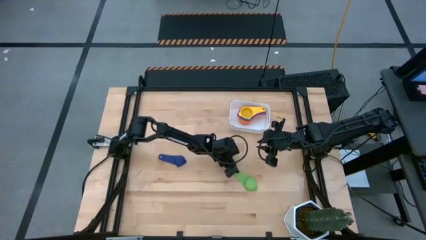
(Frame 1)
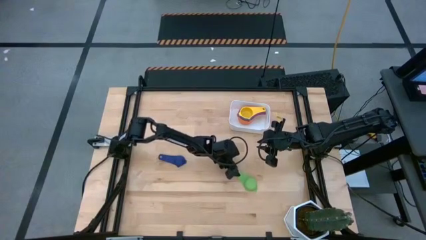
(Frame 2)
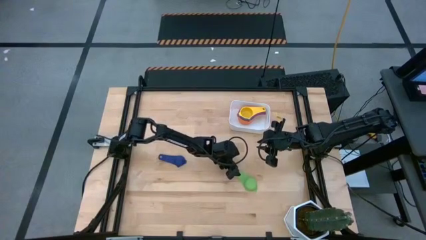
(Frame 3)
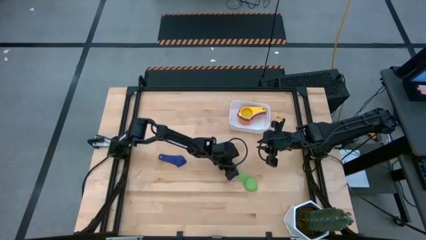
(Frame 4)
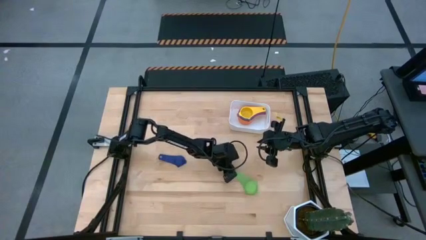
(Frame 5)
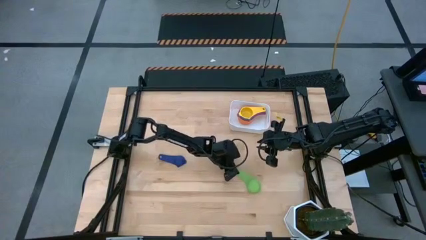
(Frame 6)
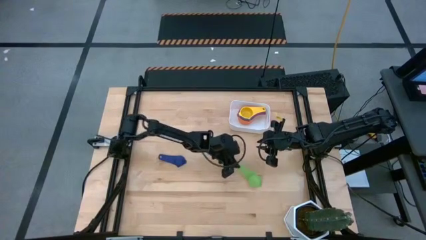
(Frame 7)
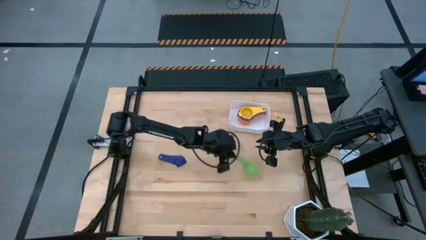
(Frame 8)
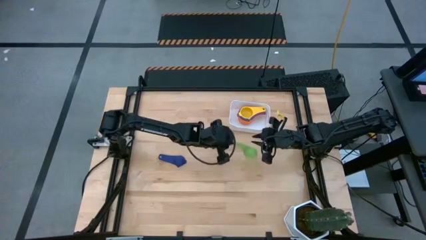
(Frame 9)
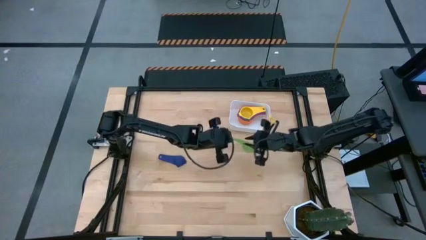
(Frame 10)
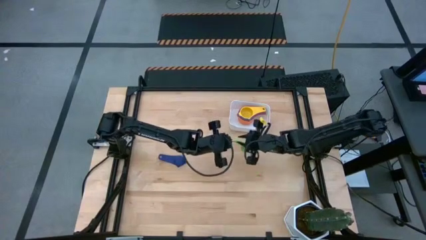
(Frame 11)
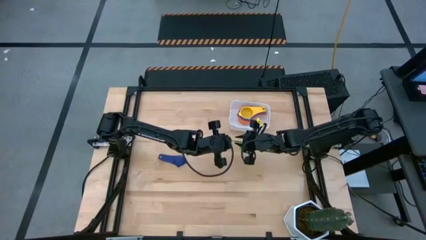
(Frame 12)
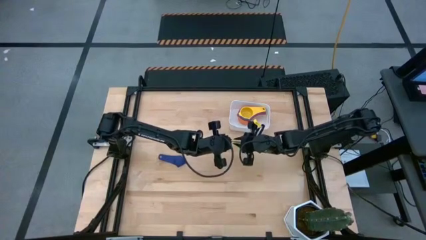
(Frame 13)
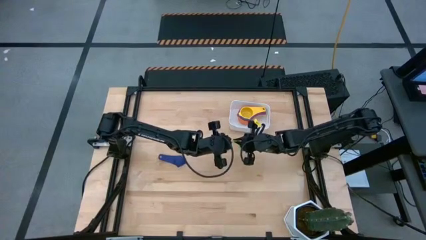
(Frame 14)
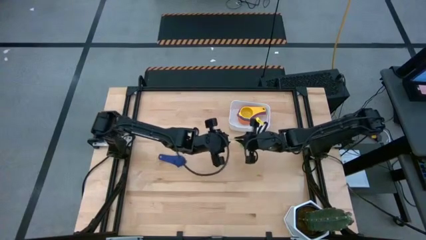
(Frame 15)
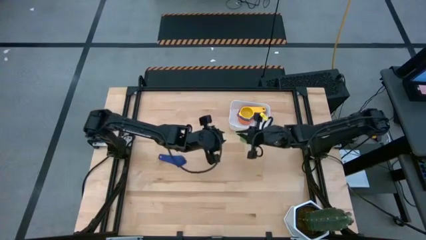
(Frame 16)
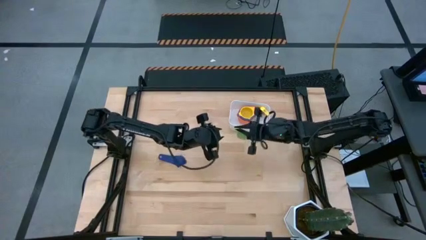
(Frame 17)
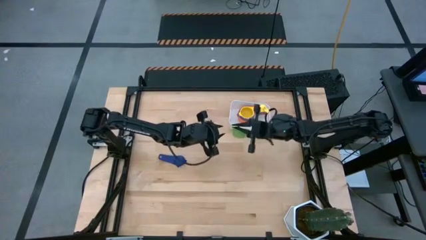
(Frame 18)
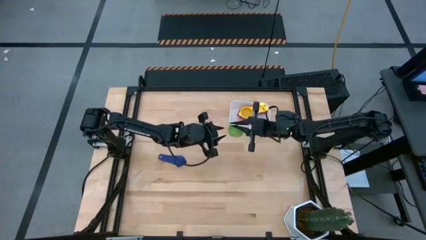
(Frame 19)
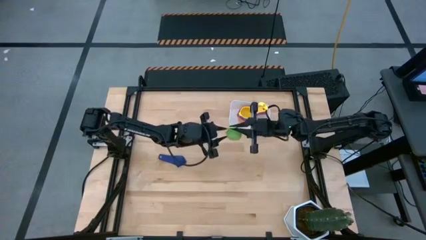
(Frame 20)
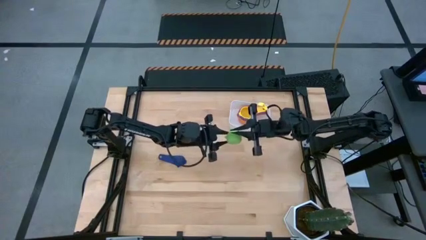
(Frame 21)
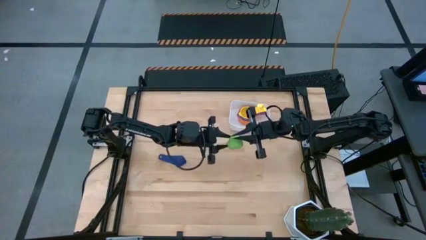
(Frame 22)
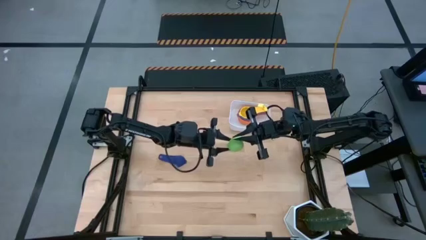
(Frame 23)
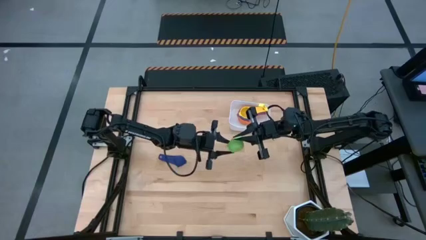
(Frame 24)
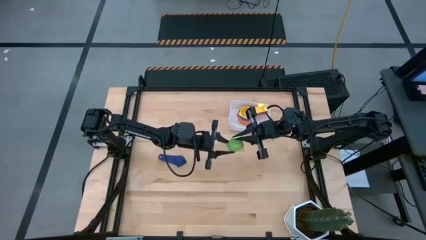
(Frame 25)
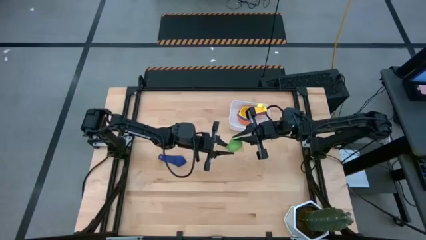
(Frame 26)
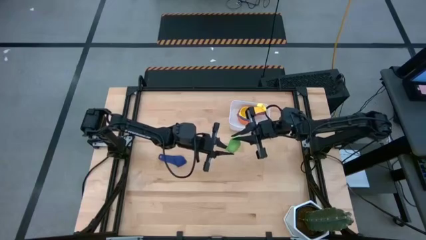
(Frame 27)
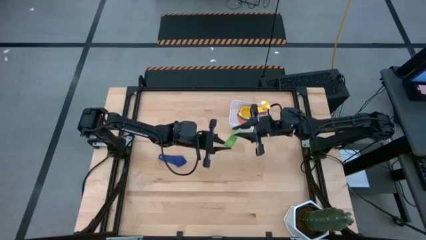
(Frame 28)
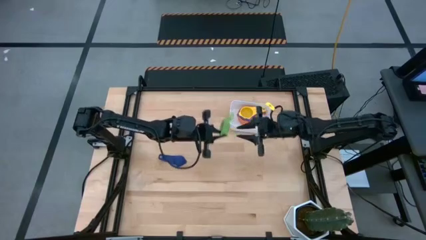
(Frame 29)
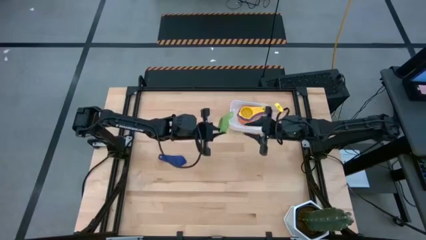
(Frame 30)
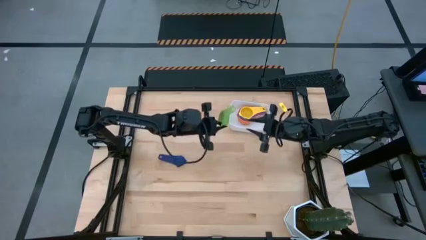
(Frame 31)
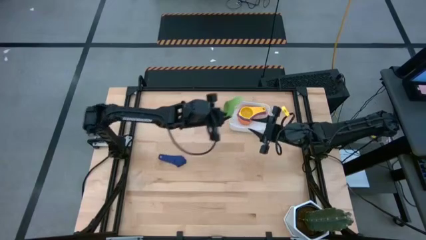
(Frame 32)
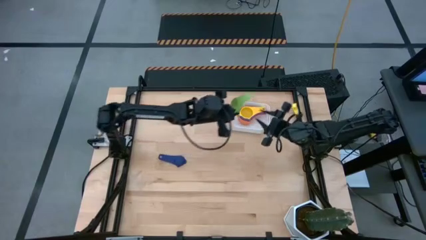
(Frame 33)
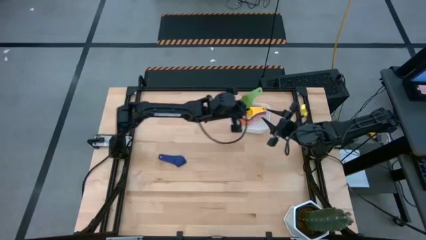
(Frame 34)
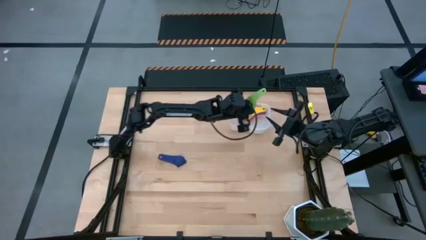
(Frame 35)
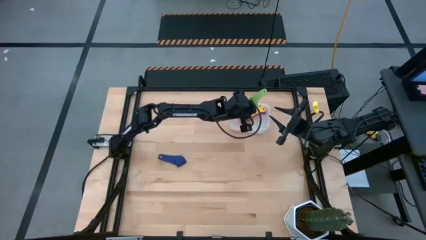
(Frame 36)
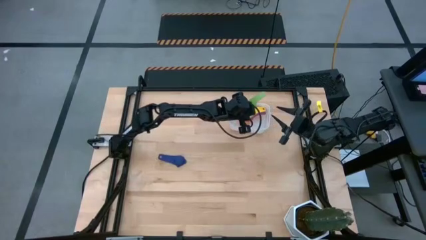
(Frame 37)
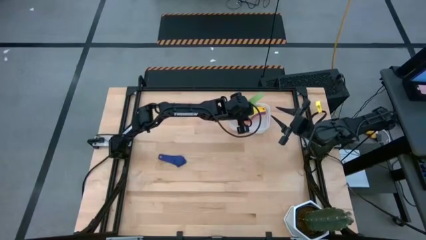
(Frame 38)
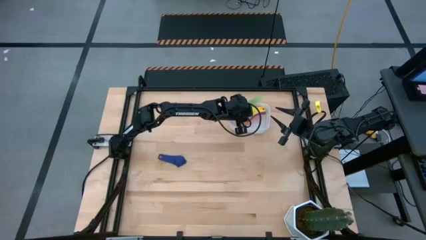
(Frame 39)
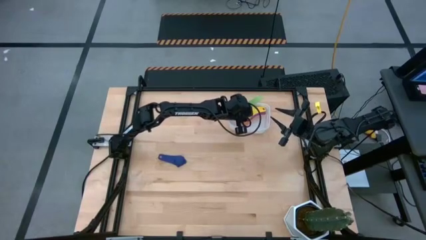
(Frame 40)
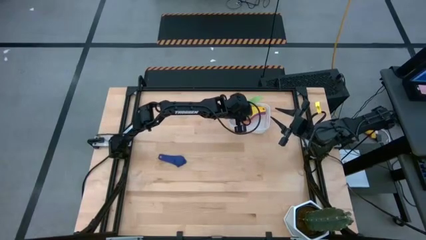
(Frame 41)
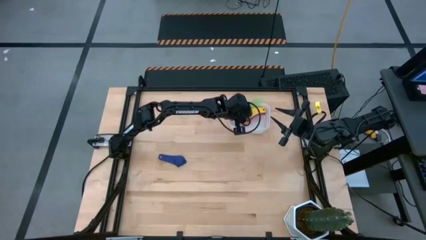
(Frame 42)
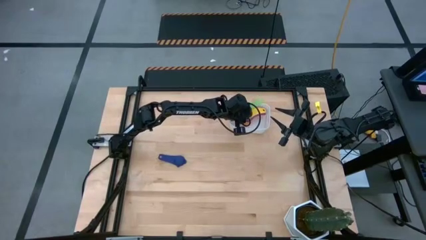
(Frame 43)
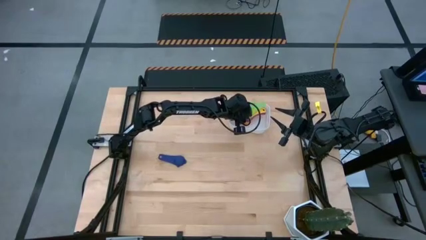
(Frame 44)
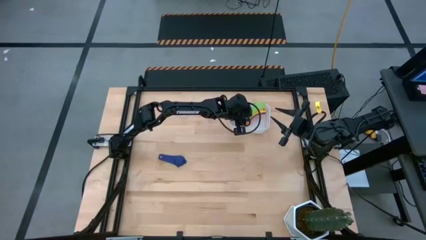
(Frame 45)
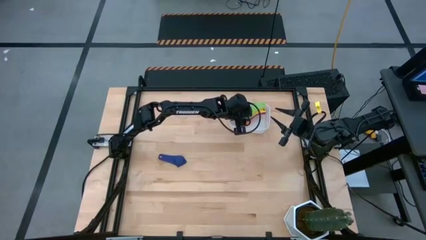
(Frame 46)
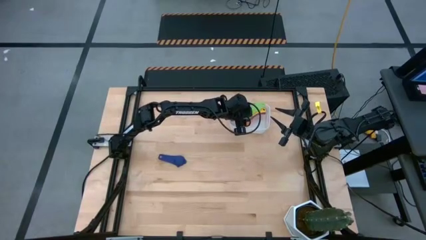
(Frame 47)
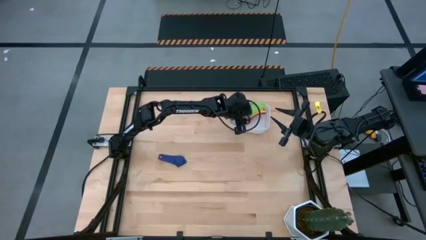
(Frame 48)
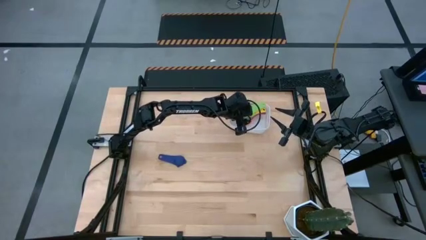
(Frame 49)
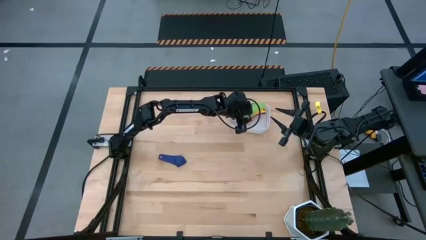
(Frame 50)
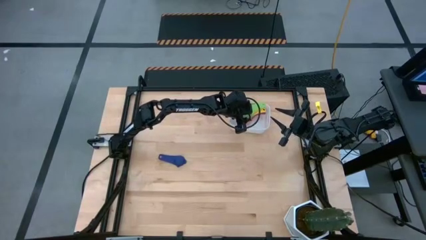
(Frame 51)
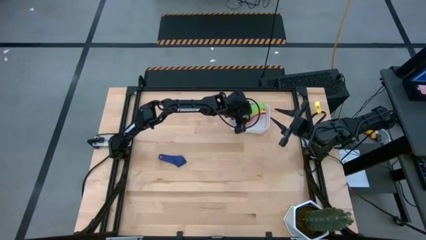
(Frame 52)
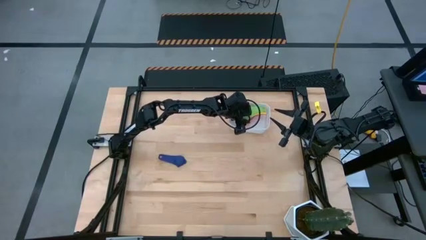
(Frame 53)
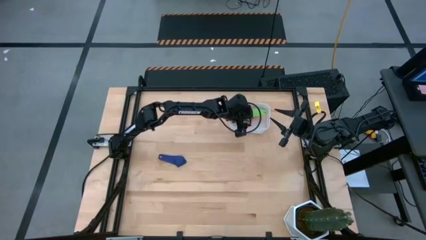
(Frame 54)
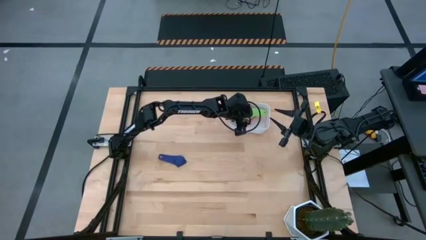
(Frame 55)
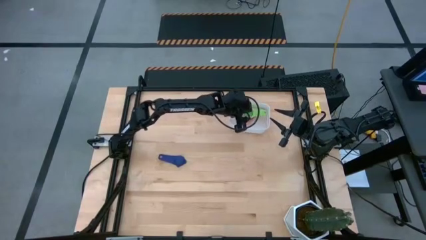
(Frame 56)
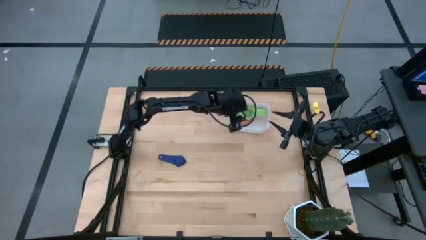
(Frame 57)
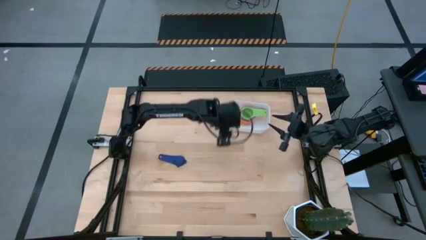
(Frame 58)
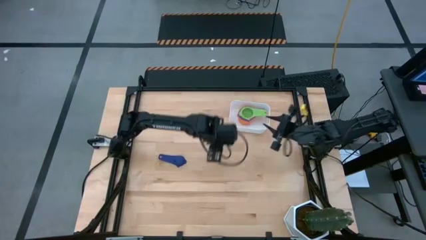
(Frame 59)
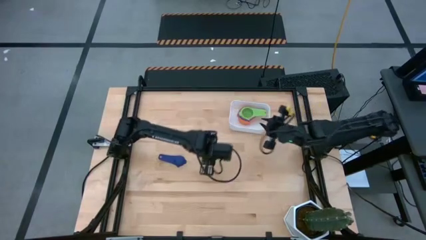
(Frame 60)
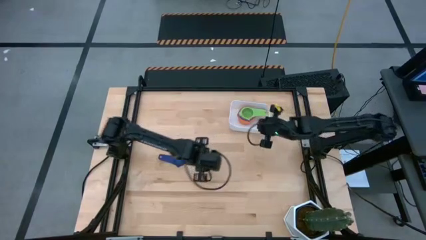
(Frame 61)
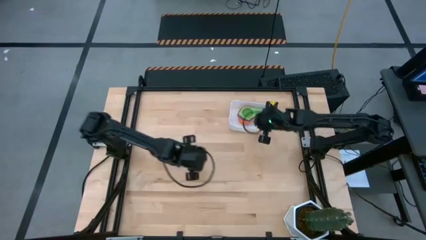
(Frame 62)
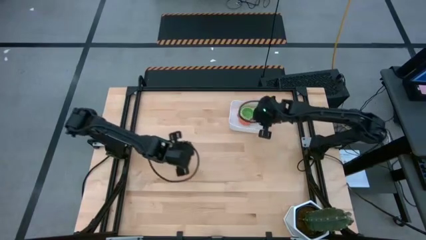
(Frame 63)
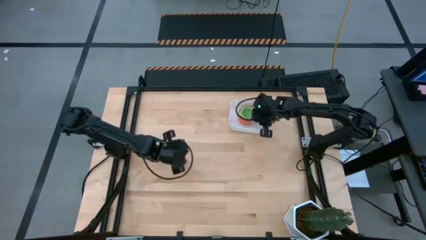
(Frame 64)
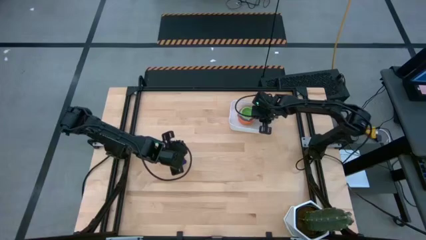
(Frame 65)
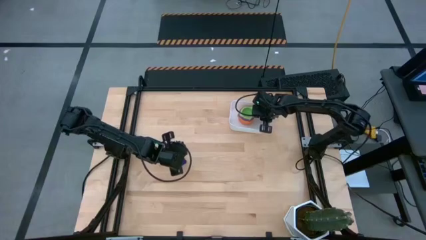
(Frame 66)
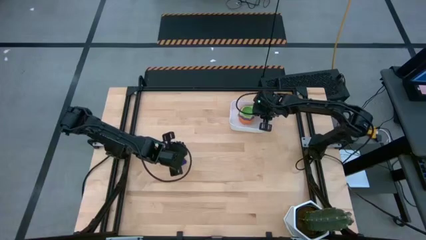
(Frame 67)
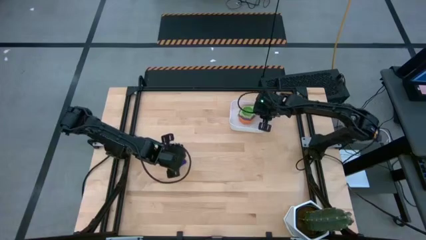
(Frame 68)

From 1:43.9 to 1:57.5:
Task: Nest measuring cups in basket
Stack the green measuring cup on top of the yellow measuring cup in the white bin
